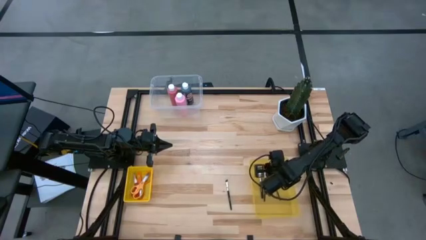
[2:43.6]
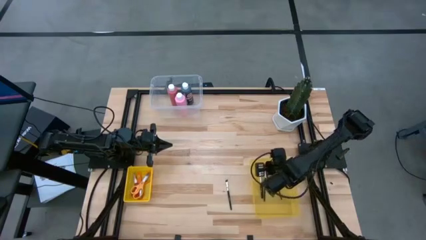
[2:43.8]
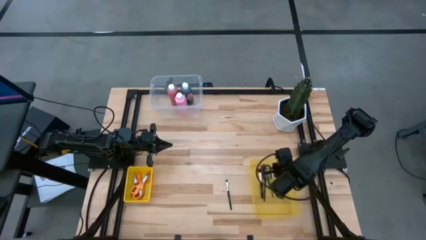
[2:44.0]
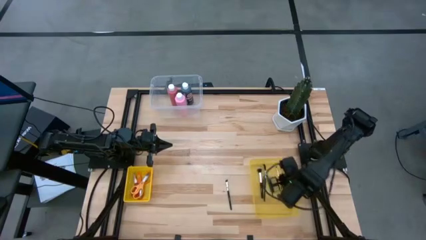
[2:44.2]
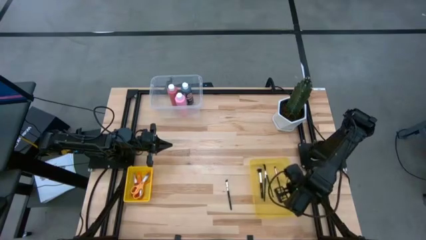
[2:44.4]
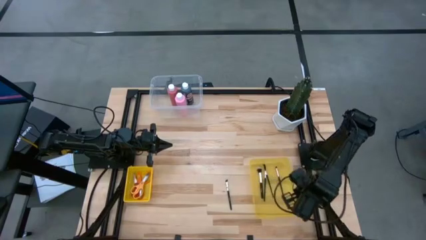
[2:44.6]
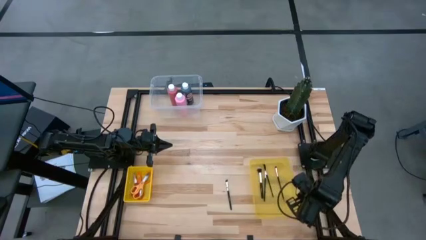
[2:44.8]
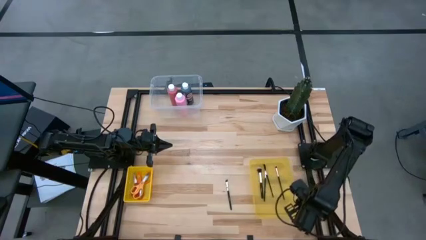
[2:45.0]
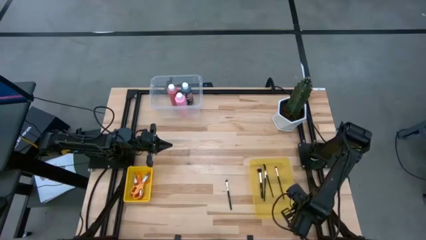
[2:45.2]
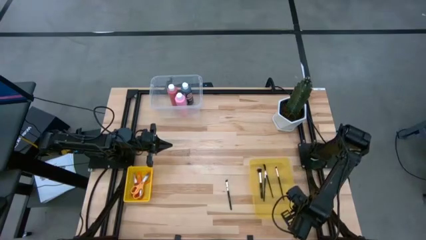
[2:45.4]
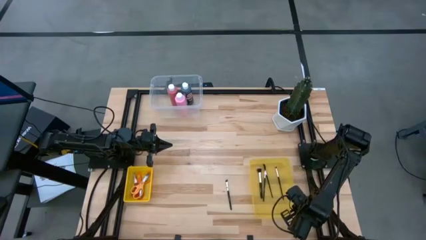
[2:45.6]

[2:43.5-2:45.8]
Task: Pick & Place Paint Supplies
Adjust the yellow bin

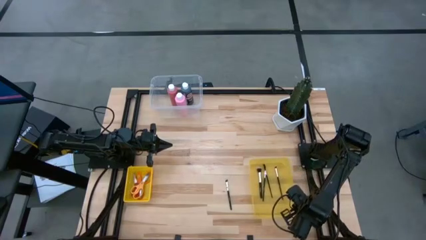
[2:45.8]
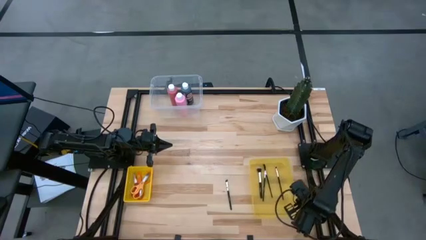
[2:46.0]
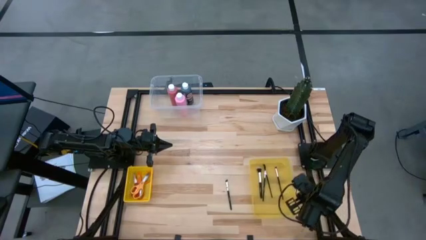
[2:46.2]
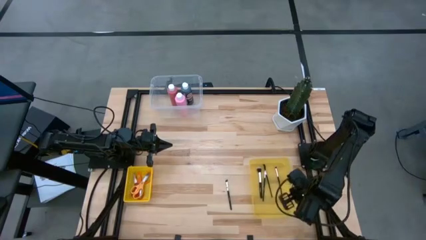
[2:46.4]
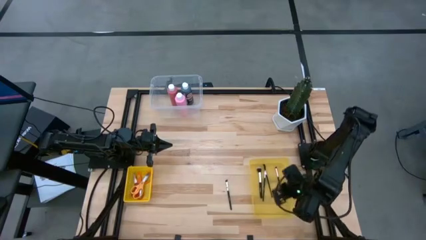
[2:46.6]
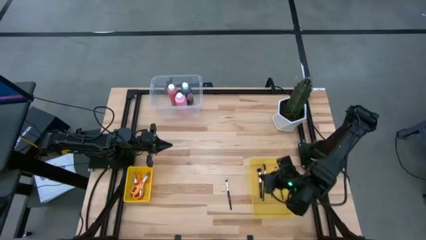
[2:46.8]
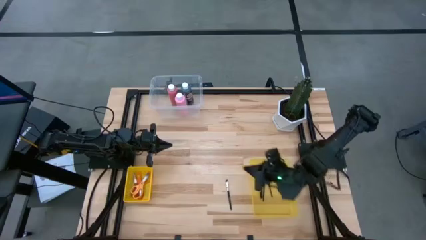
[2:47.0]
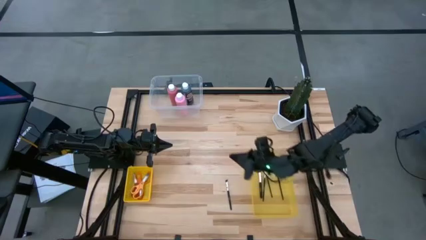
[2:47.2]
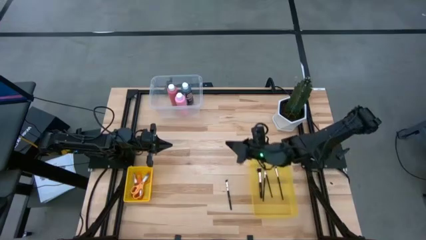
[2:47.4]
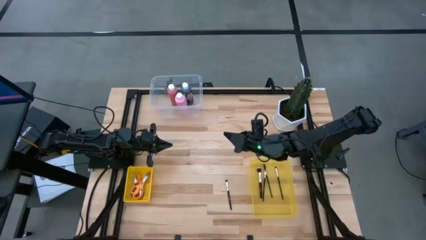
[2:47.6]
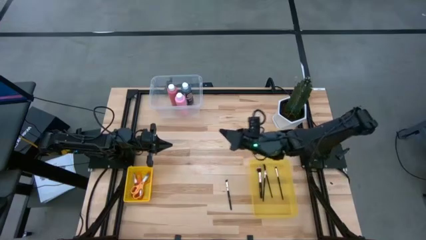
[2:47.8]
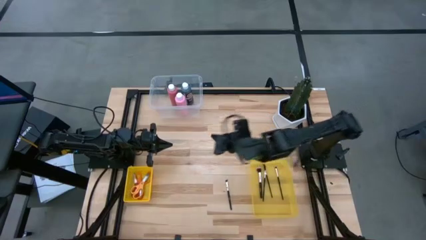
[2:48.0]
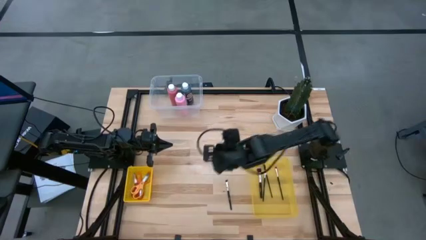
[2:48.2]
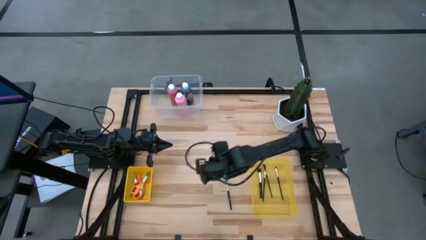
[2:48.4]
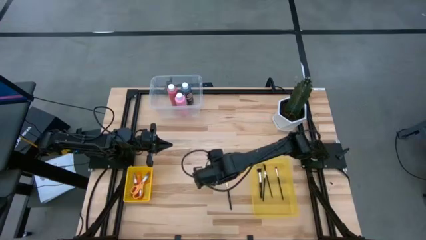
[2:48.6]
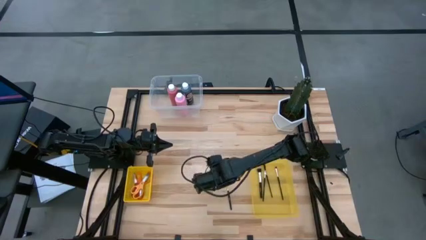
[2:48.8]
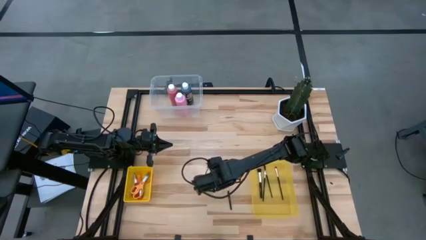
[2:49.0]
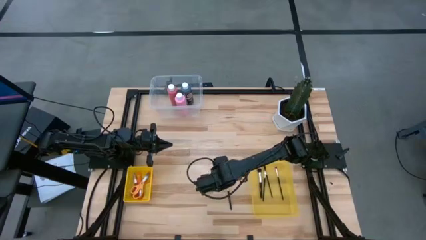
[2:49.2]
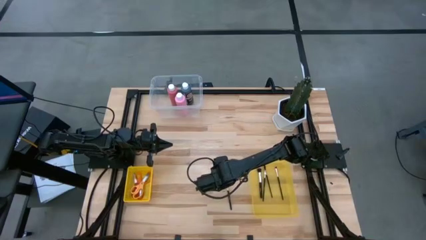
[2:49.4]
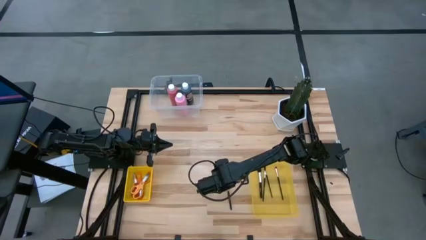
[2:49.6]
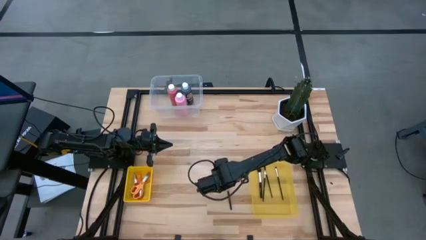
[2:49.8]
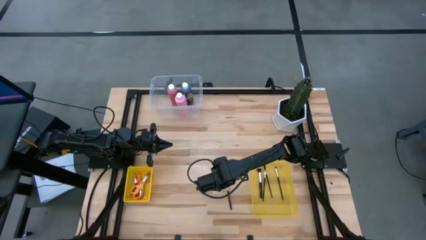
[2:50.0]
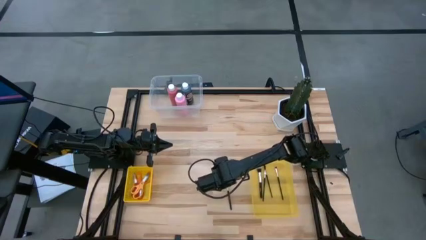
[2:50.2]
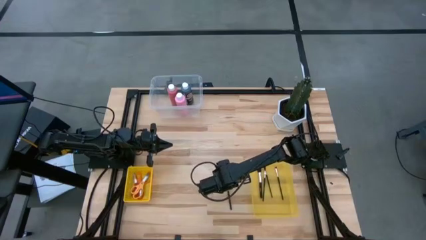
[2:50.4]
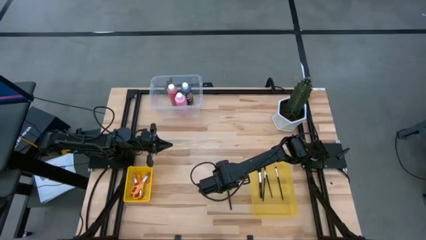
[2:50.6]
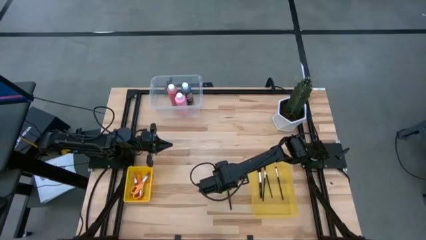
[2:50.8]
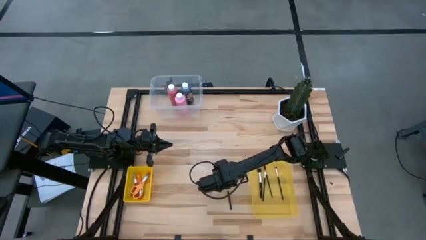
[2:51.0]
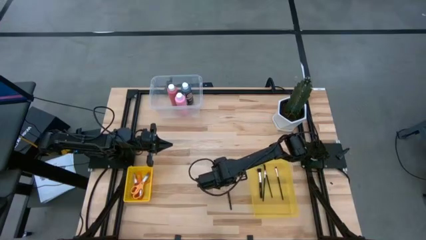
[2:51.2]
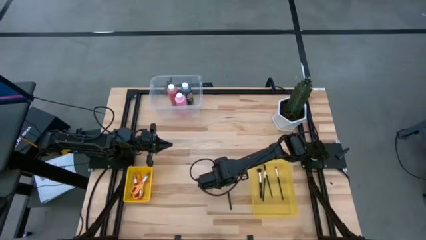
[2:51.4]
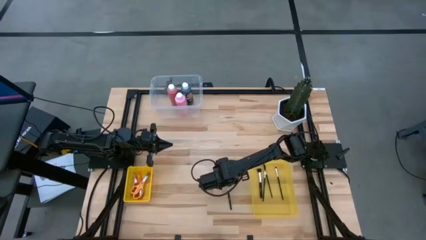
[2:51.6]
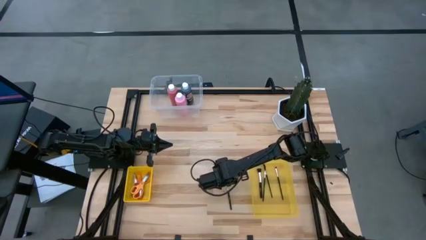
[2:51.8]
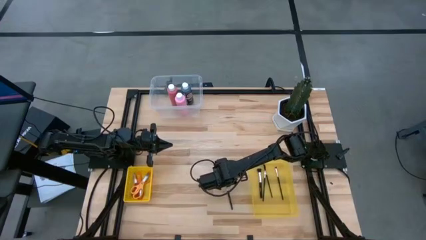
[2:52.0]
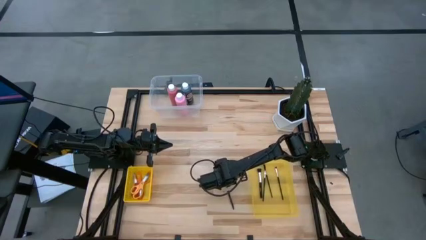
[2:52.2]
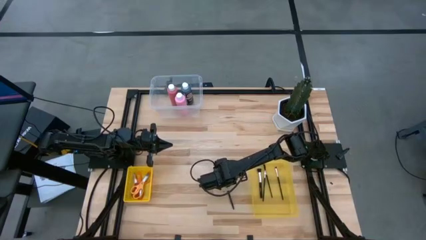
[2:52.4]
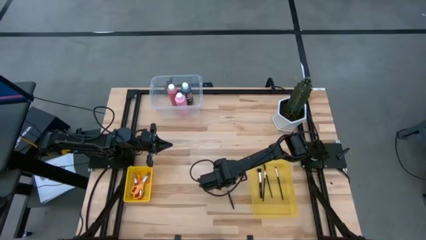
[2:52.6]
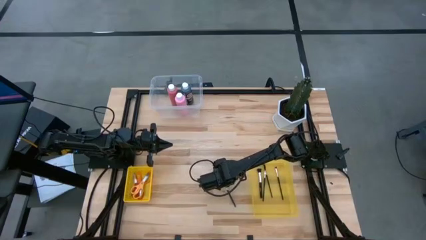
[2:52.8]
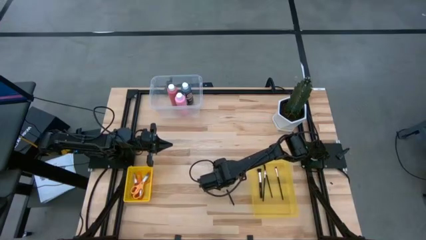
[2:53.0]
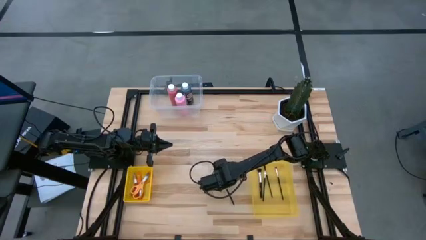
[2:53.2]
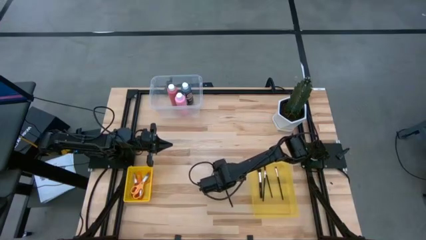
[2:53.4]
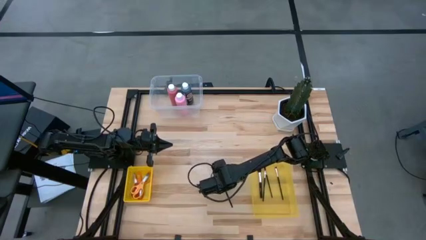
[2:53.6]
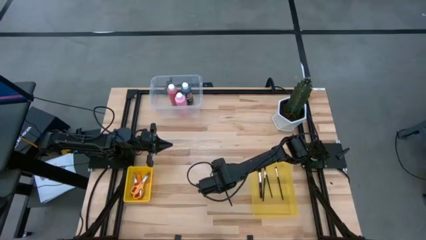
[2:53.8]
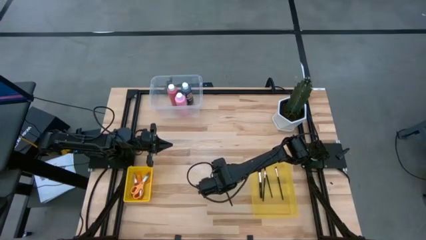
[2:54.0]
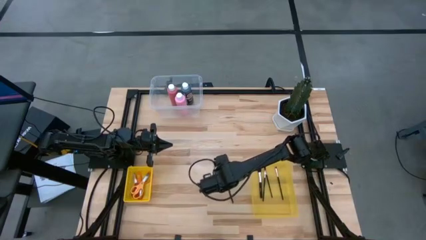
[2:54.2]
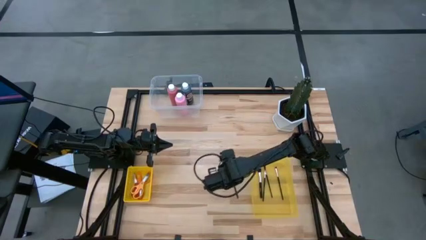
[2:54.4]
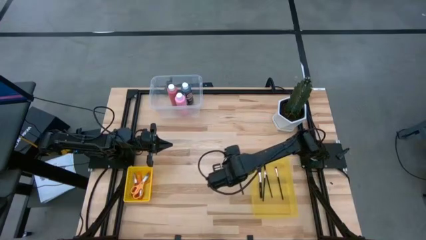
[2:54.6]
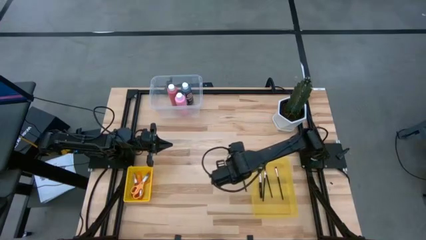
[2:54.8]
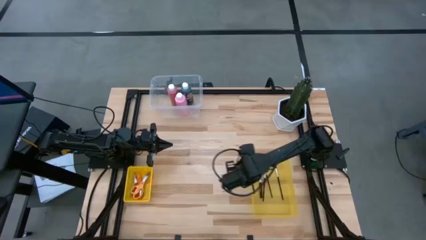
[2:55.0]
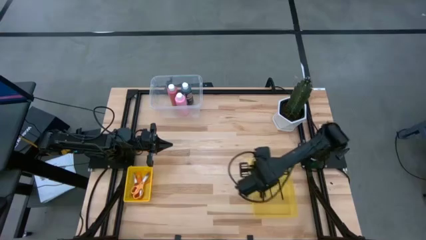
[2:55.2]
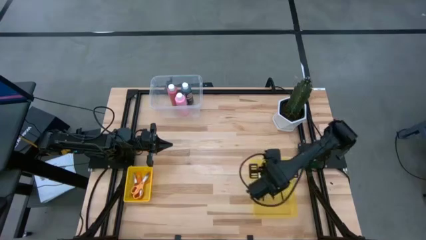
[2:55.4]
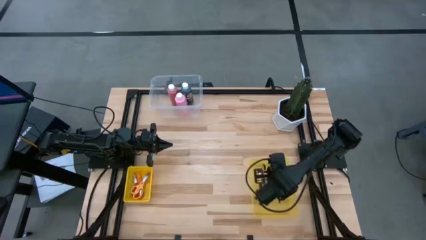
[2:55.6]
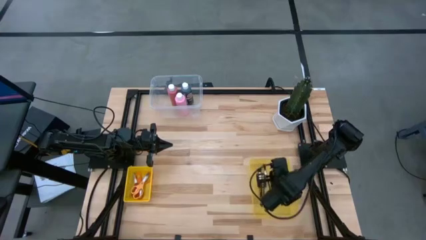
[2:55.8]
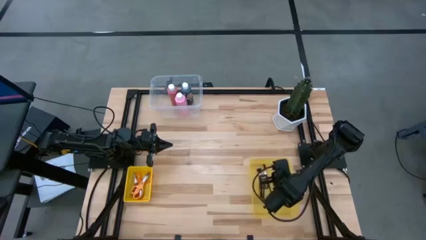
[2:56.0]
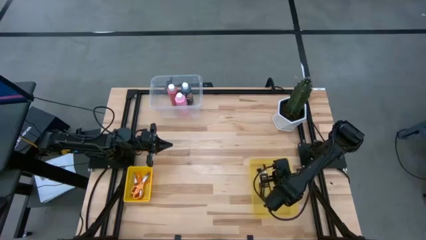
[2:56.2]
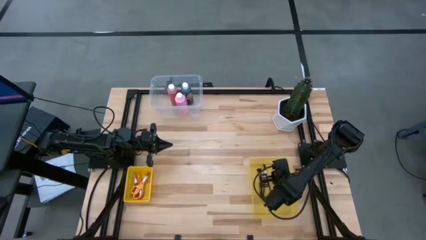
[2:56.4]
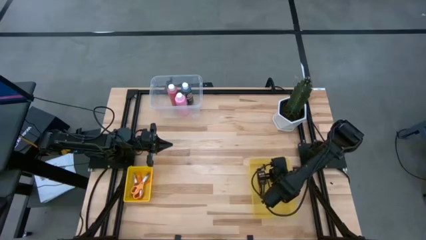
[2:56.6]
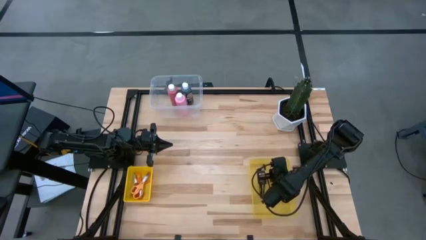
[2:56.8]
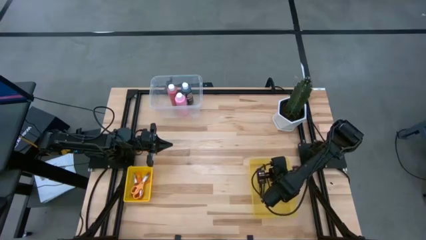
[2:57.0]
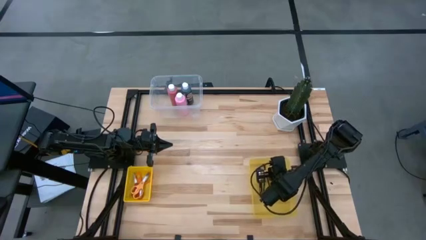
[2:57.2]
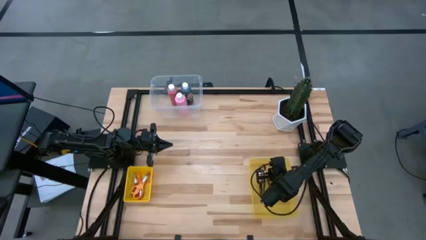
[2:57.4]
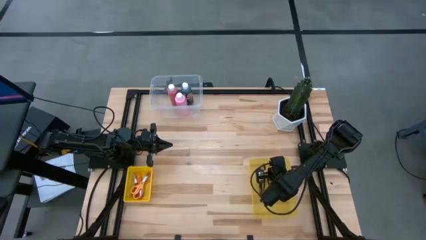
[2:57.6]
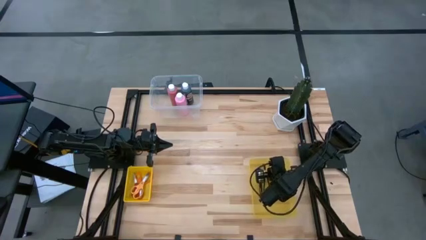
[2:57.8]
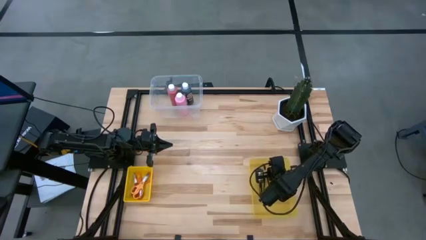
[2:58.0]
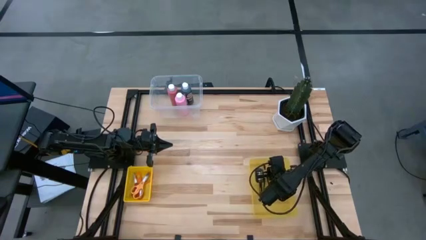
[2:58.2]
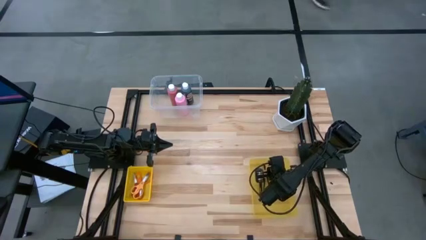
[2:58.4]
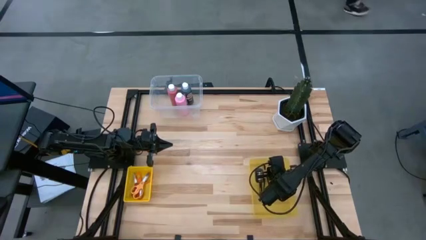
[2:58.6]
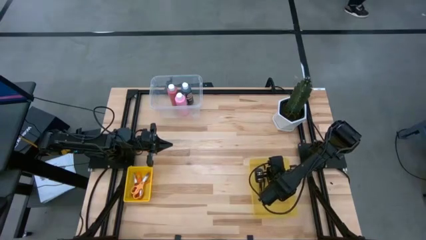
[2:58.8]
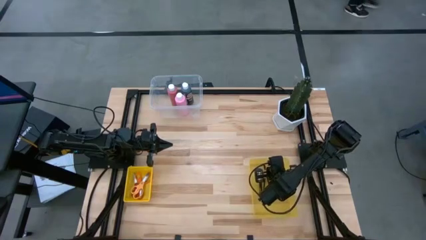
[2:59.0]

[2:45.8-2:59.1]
Put the liner brush into the yellow bin

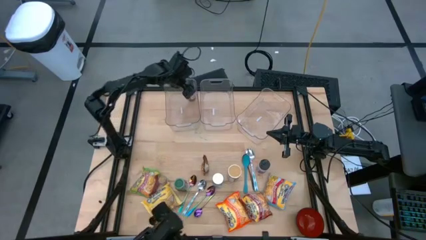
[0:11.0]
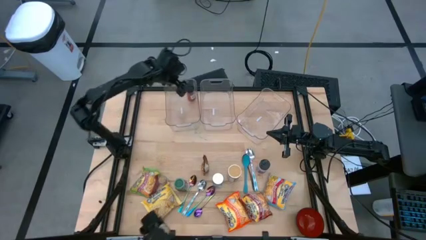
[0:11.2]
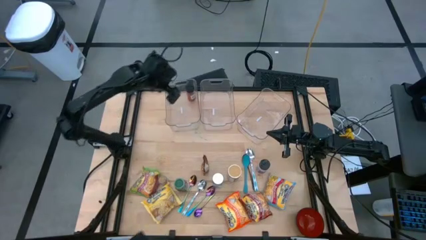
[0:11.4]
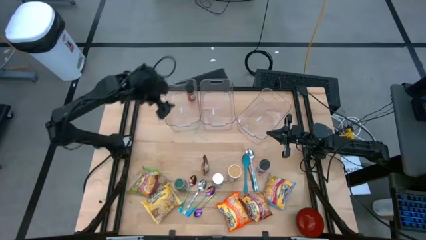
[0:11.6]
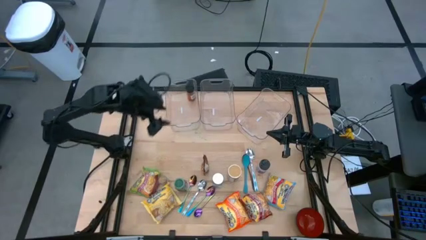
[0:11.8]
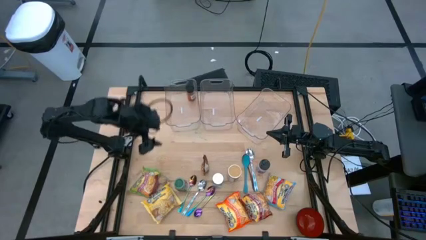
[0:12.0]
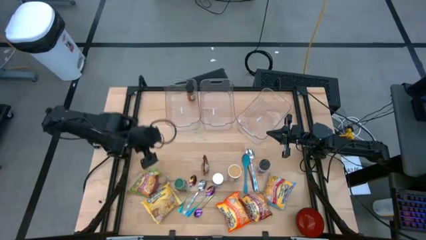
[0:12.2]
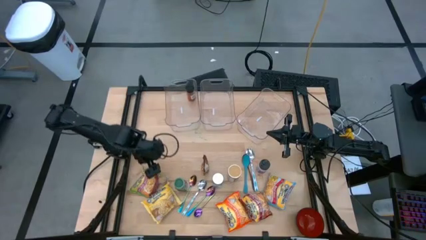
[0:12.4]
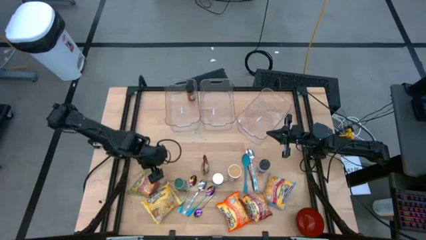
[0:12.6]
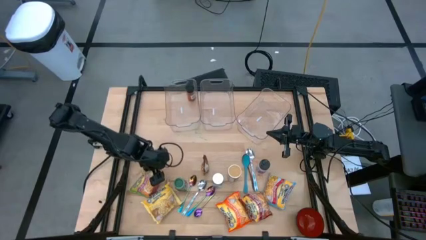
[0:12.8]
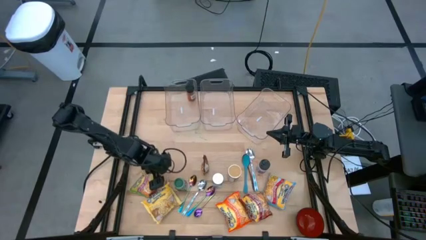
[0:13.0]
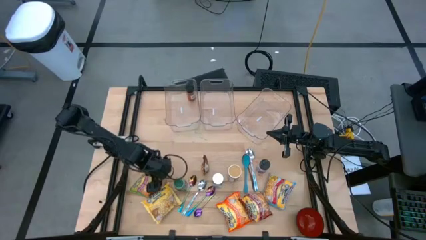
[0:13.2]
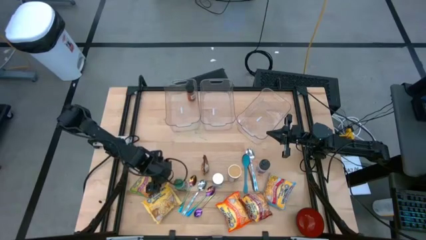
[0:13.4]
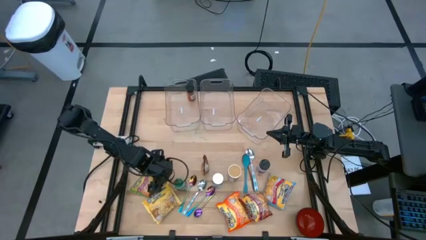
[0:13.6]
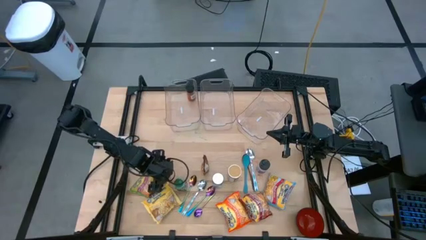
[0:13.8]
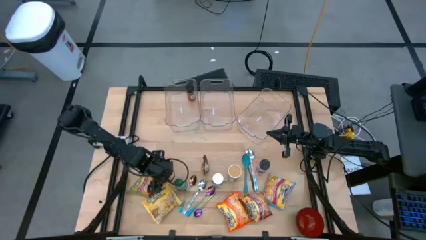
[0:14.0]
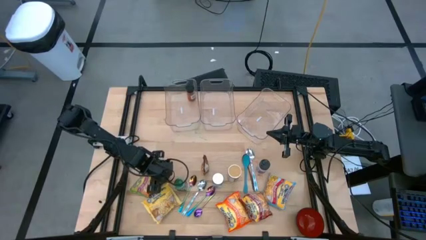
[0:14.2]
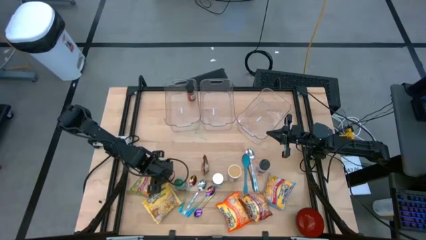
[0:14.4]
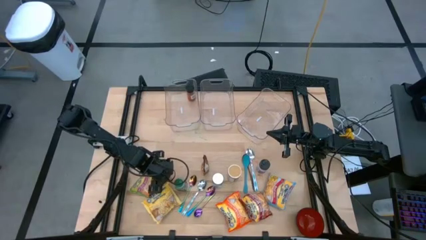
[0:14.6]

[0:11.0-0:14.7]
Task: Pick & Place Food Item
Put the brown seasoning bottle into the left transparent bin
